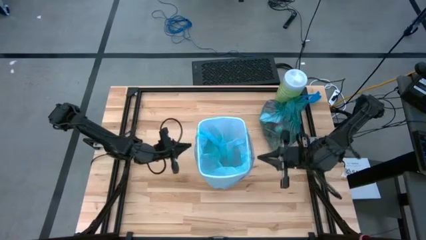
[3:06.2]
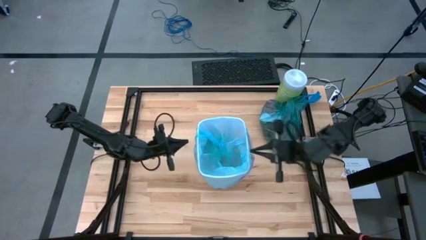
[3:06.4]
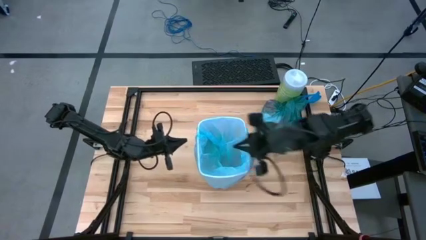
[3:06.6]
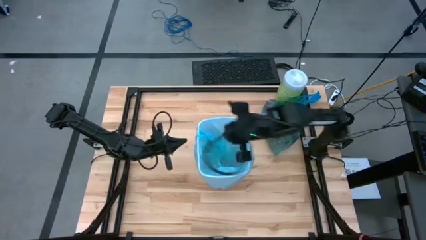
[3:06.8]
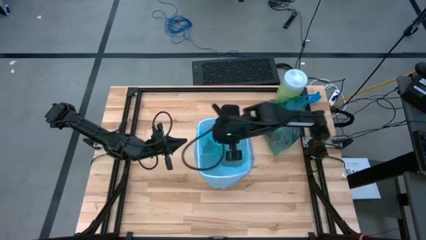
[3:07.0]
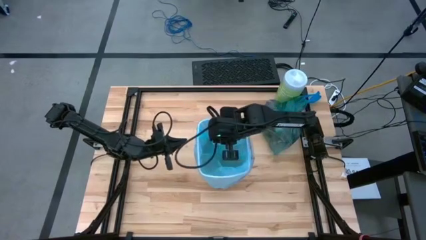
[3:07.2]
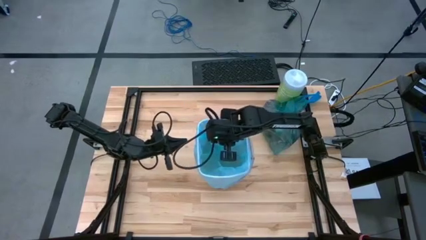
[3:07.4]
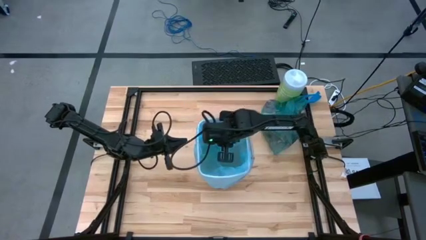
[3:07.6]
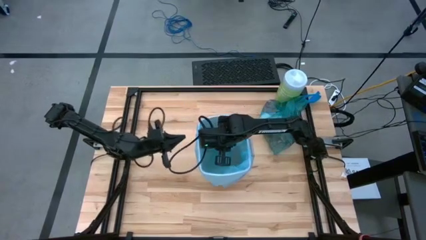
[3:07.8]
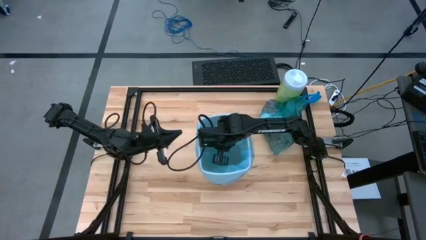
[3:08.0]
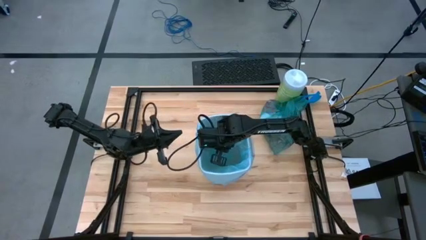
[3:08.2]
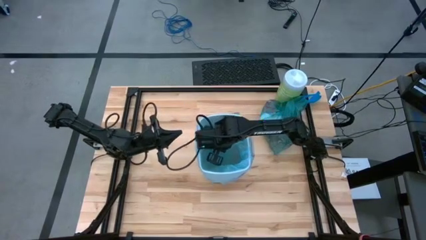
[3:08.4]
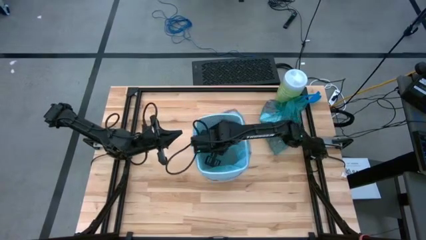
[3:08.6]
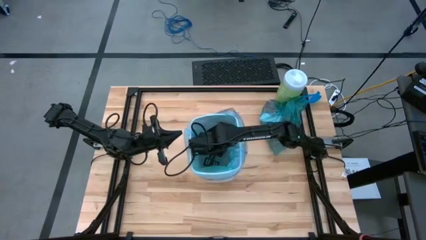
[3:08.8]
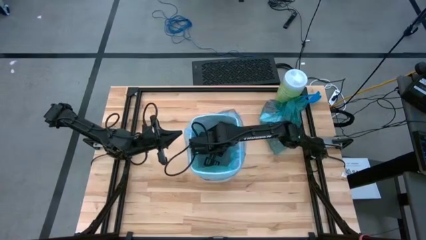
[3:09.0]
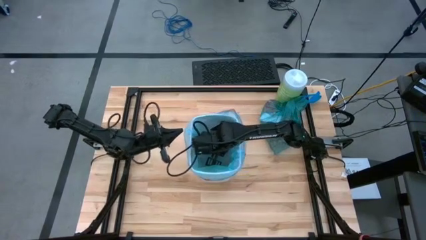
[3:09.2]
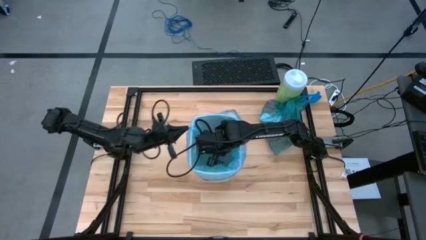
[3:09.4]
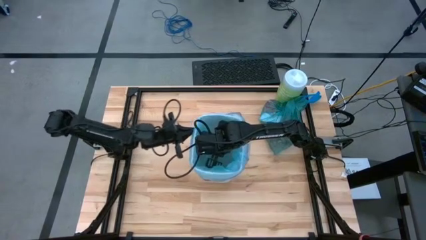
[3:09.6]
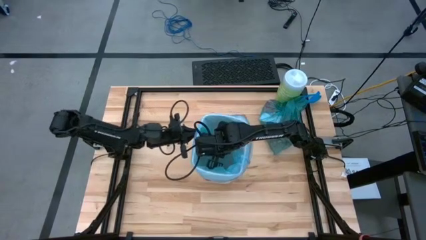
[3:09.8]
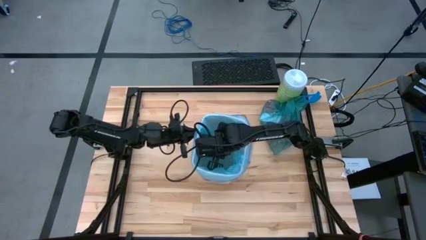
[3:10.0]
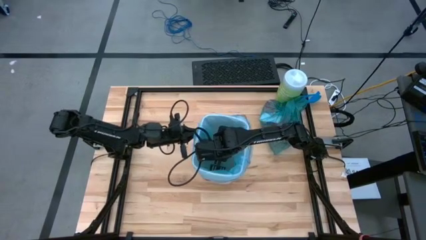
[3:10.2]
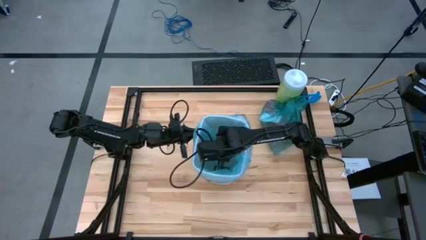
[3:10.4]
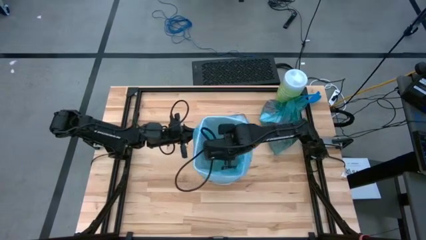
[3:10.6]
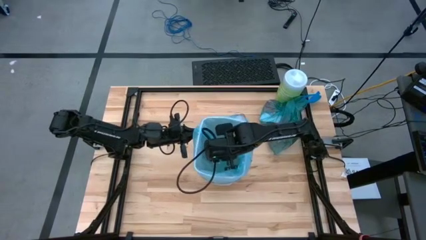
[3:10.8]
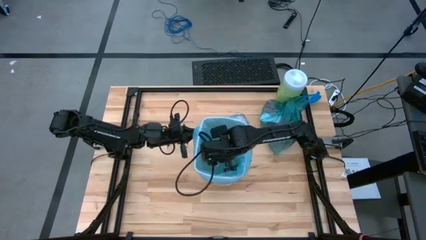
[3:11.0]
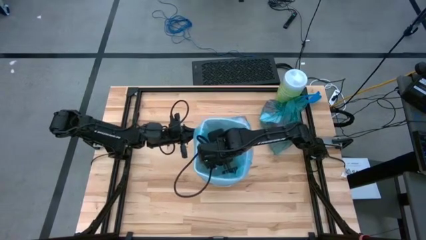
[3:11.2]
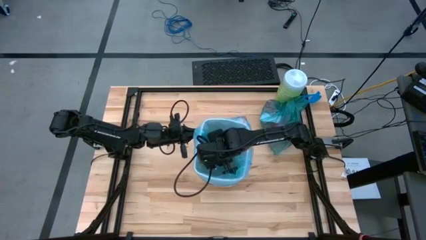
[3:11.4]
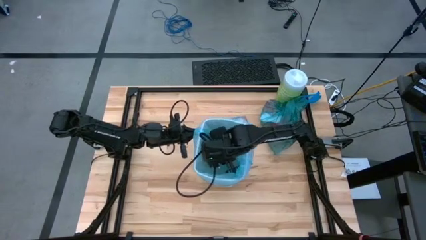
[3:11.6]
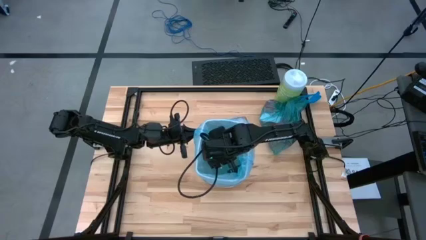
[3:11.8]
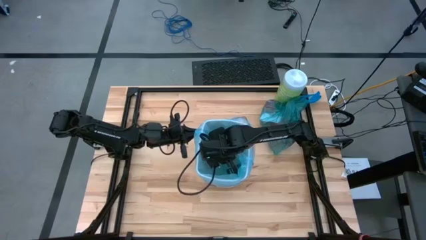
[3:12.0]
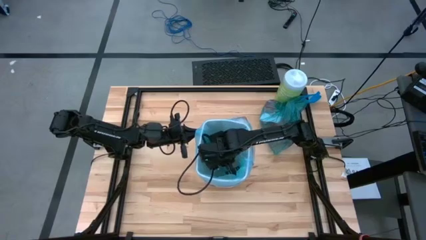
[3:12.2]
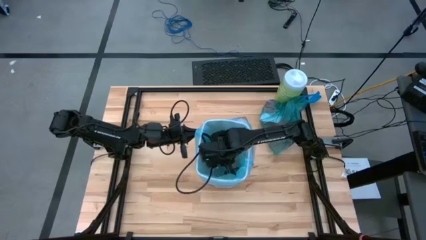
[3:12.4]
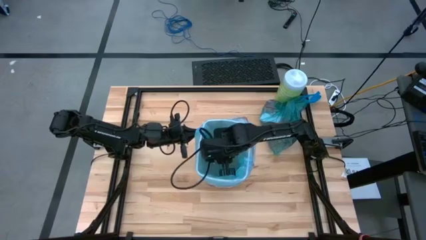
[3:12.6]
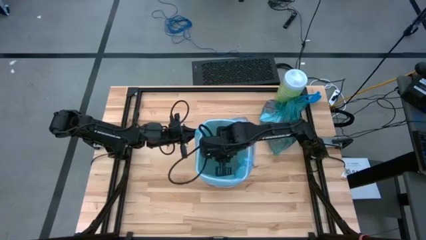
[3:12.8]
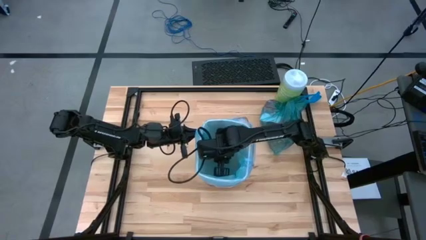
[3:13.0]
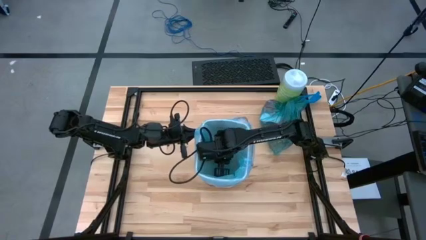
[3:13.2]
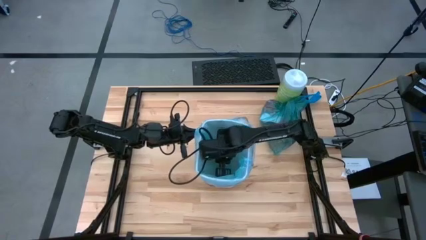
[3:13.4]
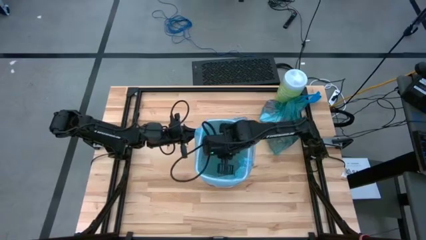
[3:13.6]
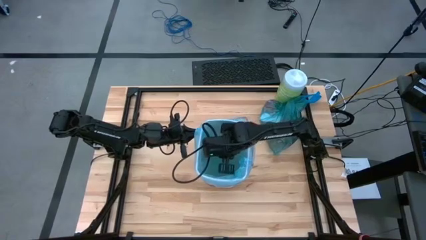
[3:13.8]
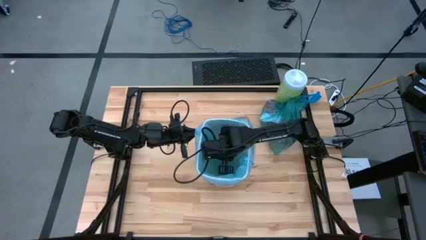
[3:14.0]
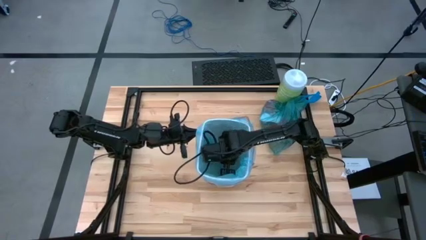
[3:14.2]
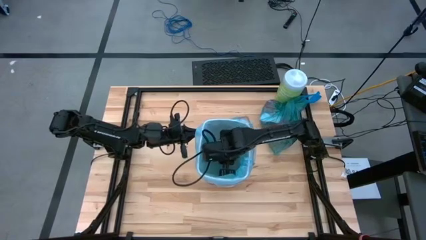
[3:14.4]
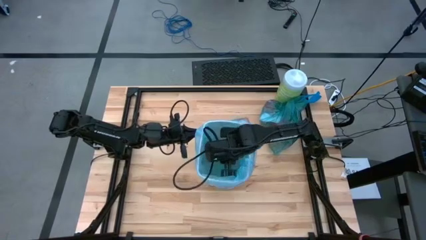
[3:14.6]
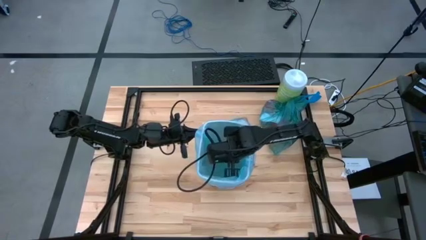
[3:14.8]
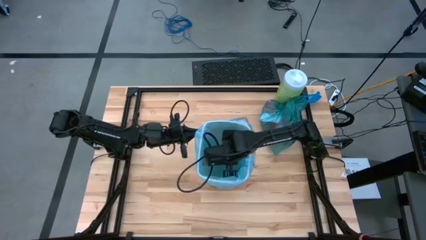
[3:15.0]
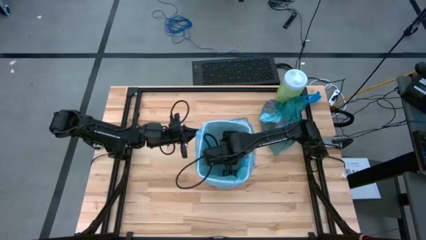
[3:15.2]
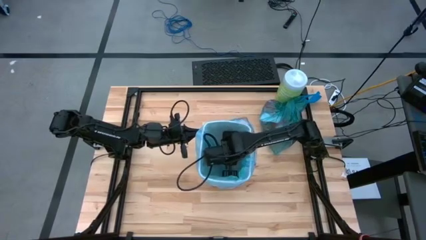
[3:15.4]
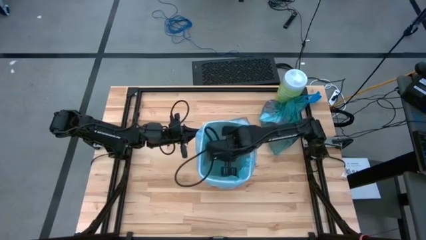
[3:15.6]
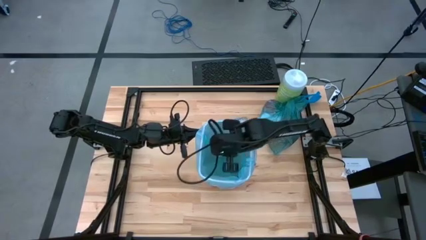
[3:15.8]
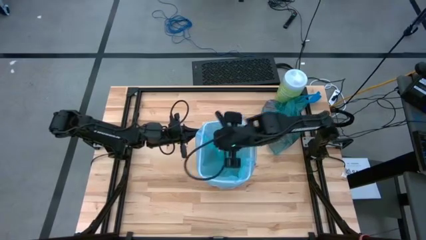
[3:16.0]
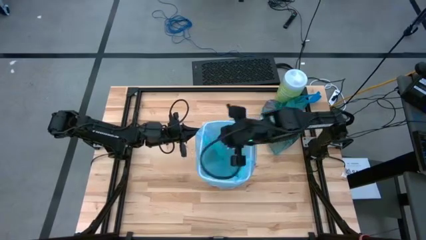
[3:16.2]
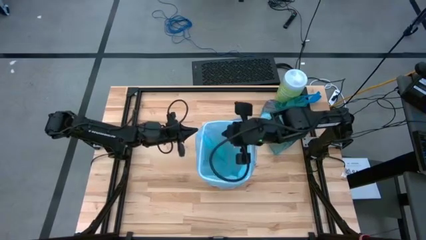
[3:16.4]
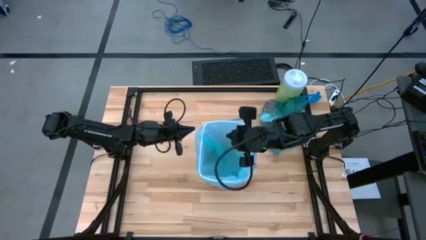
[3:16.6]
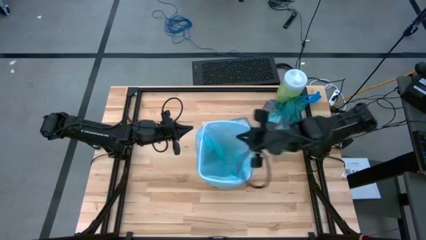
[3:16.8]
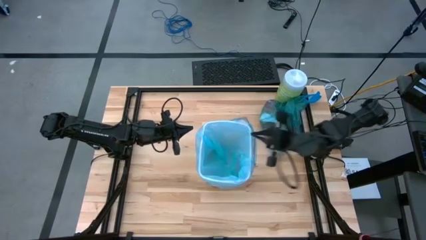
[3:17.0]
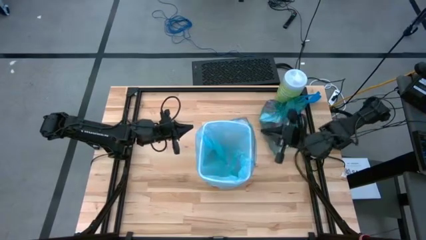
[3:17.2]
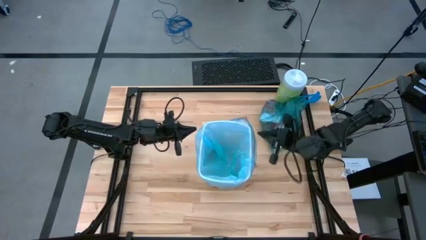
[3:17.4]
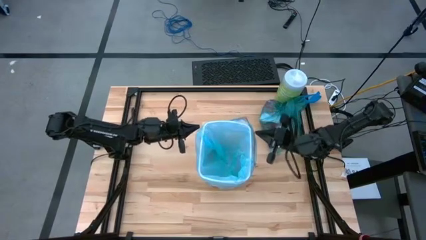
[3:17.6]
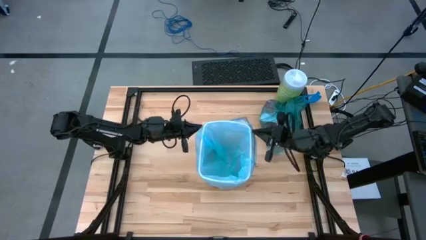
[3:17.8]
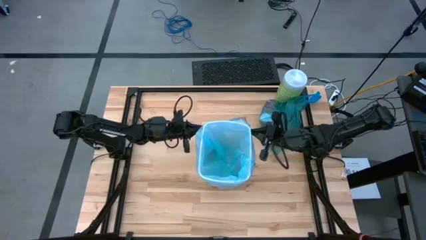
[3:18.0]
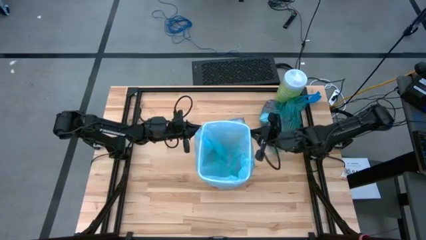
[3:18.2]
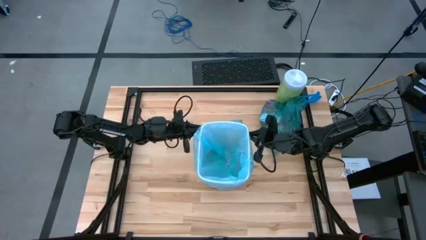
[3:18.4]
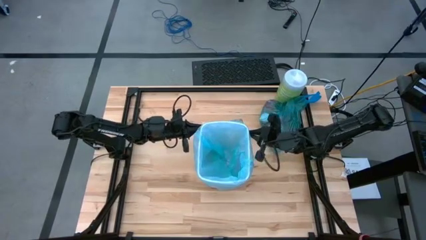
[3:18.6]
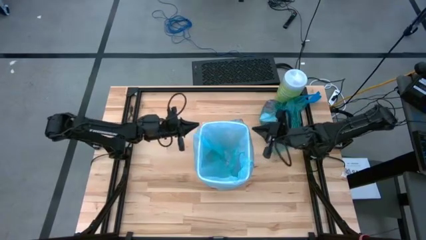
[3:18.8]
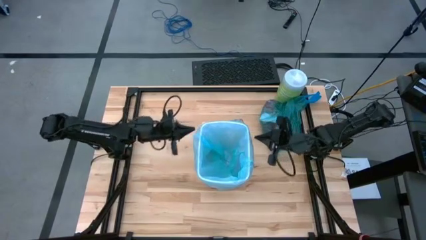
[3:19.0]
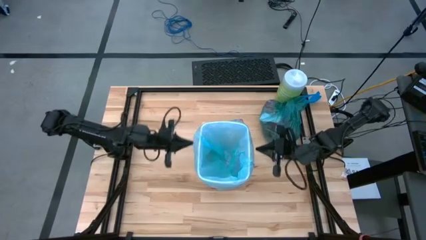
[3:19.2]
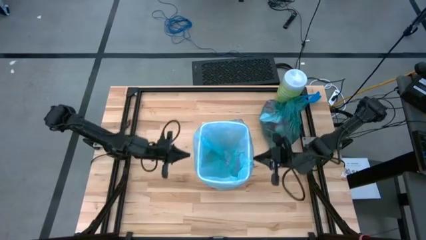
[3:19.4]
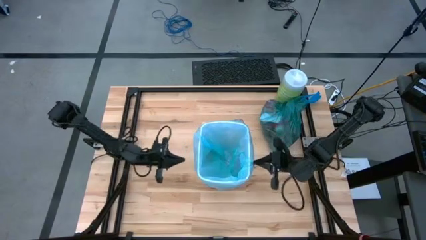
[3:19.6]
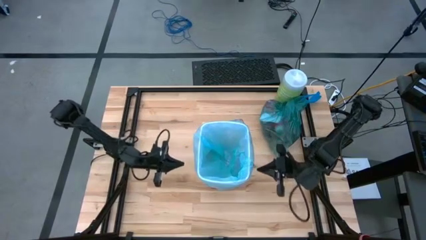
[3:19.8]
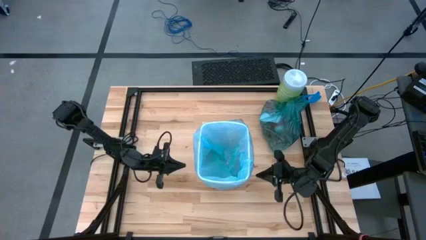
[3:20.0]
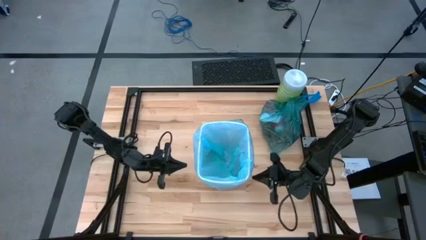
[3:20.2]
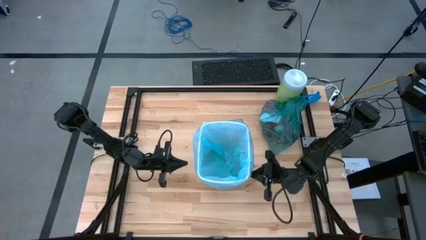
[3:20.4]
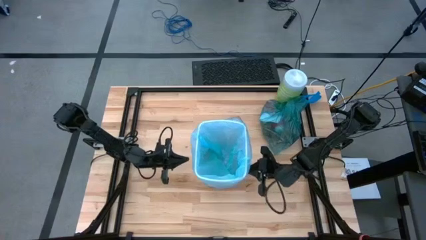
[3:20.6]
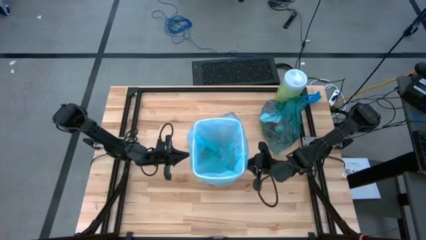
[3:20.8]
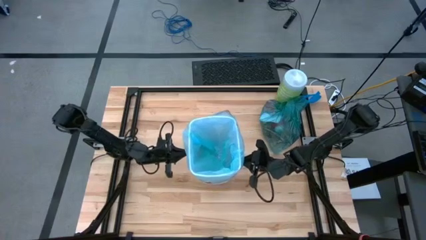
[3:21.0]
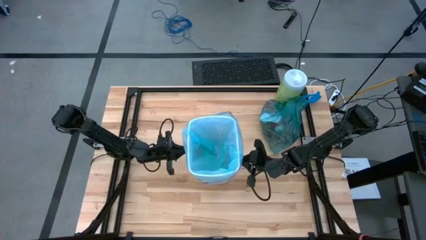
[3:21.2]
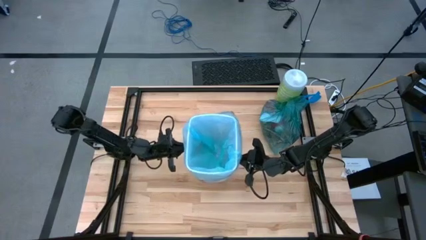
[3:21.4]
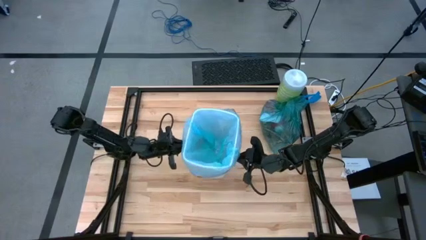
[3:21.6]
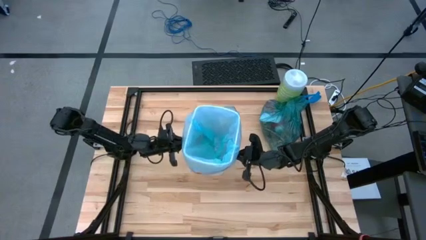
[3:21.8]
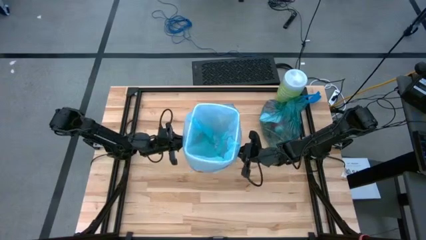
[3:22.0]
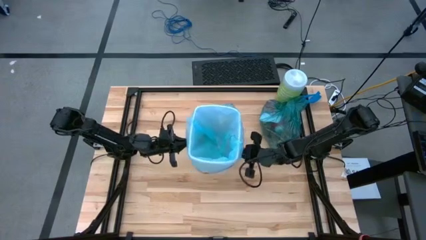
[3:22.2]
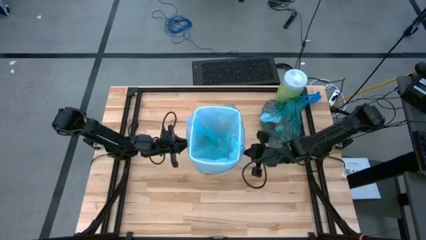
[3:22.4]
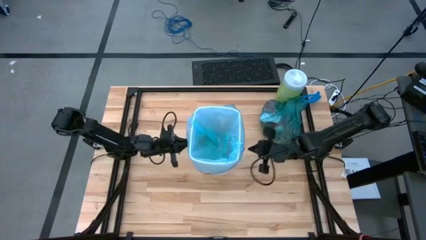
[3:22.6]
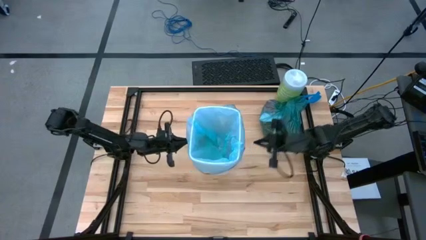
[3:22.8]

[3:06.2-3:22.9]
Task: place trash/remove bag and relplace
Put the new blue trash bag inside the white trash bin
